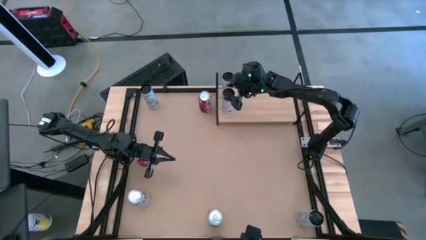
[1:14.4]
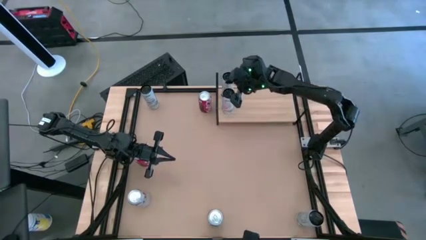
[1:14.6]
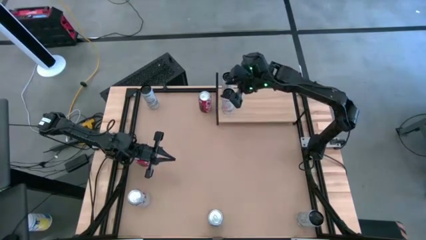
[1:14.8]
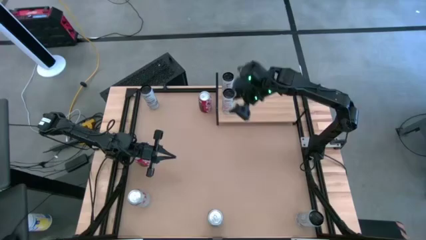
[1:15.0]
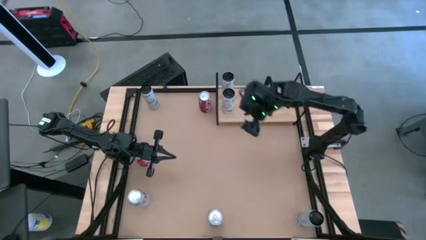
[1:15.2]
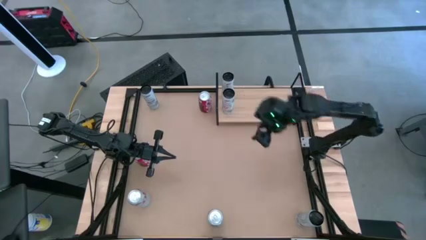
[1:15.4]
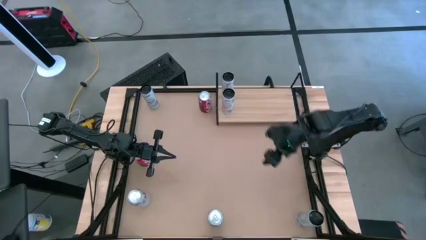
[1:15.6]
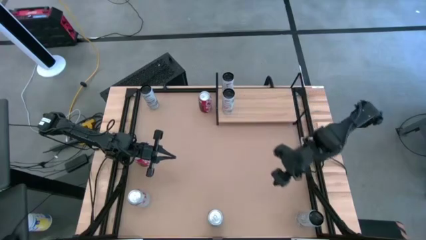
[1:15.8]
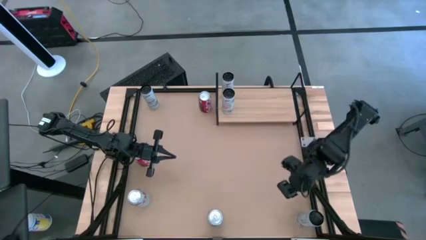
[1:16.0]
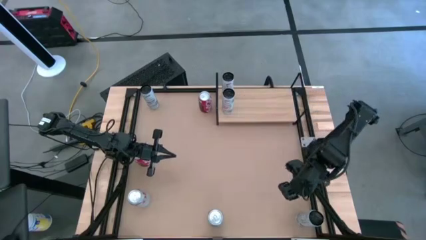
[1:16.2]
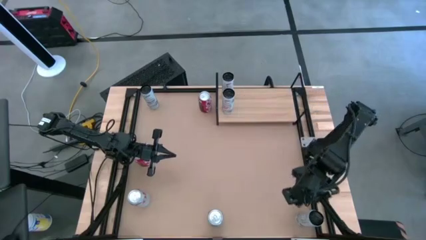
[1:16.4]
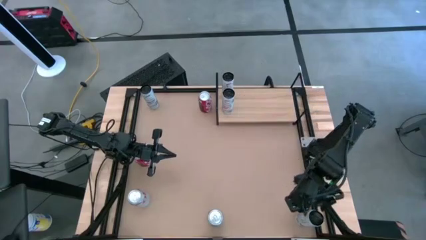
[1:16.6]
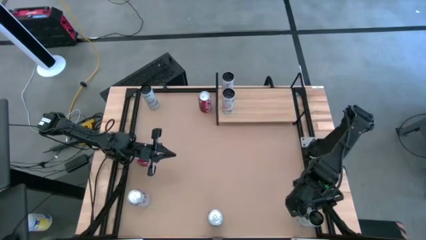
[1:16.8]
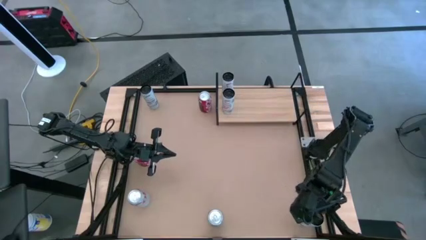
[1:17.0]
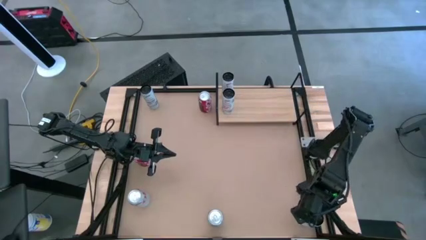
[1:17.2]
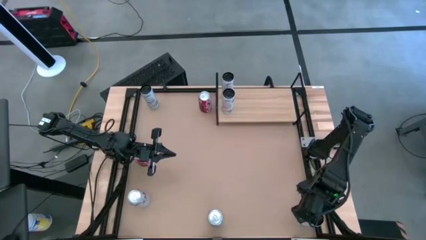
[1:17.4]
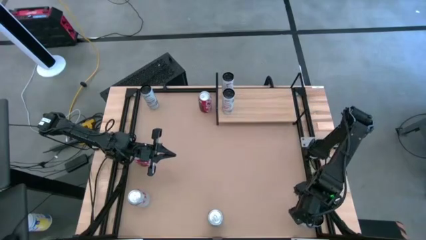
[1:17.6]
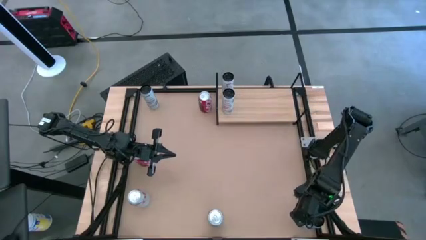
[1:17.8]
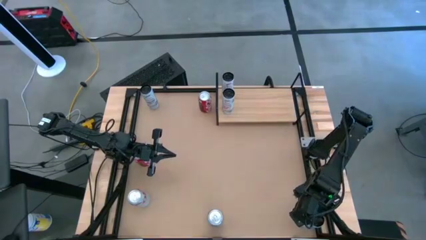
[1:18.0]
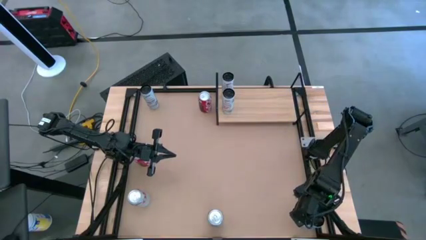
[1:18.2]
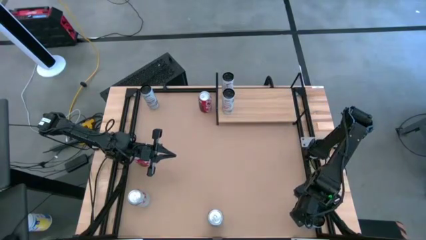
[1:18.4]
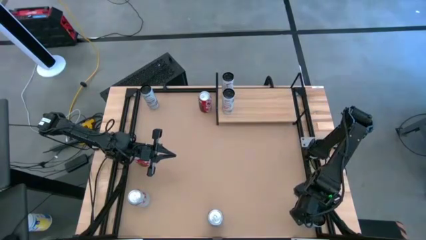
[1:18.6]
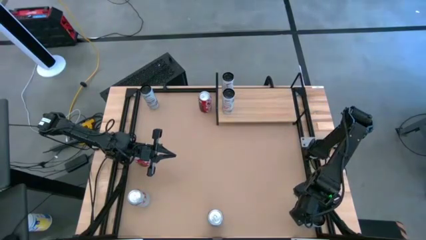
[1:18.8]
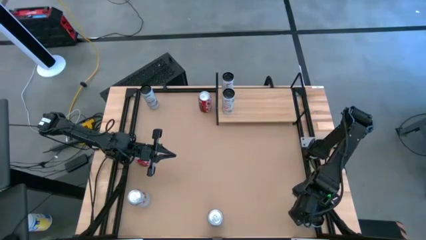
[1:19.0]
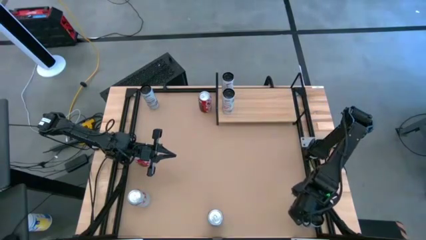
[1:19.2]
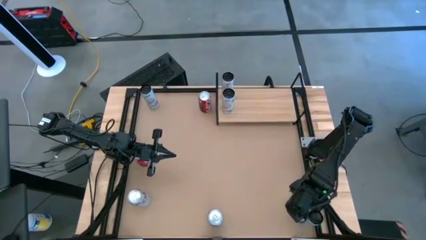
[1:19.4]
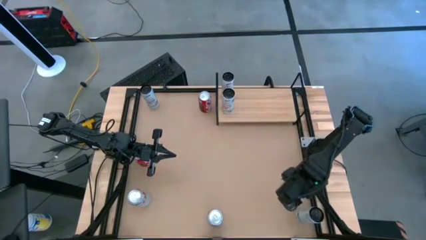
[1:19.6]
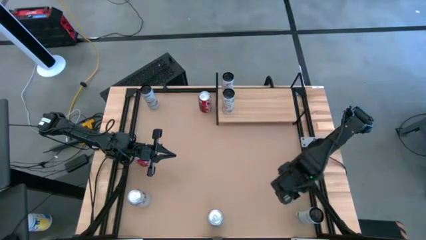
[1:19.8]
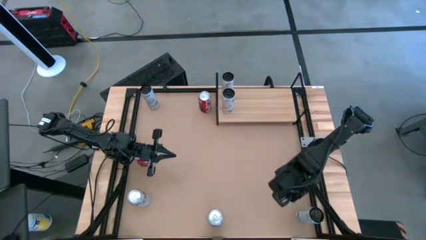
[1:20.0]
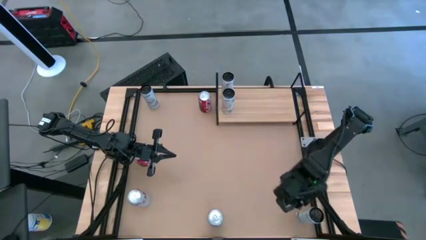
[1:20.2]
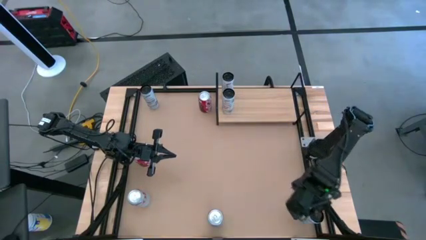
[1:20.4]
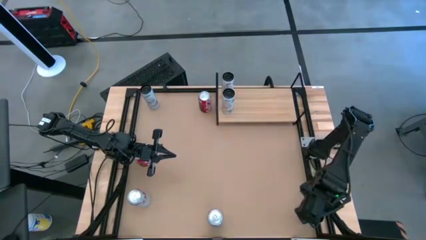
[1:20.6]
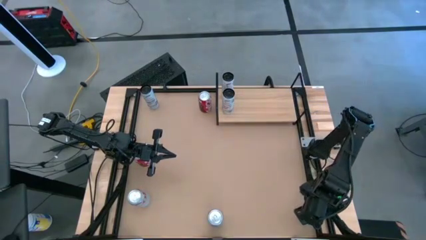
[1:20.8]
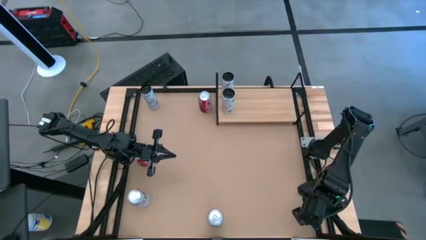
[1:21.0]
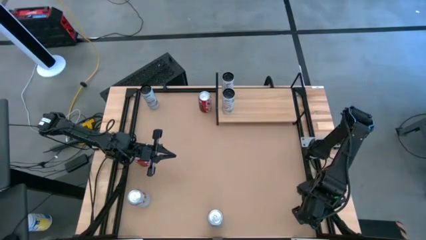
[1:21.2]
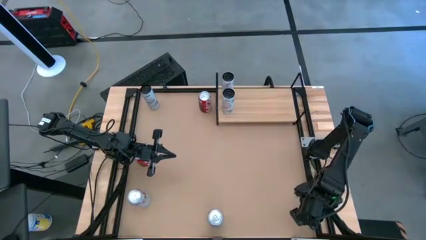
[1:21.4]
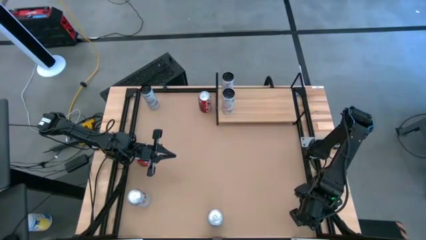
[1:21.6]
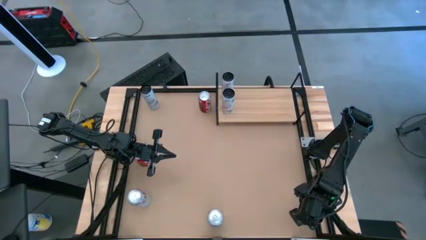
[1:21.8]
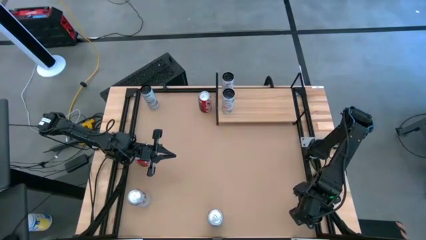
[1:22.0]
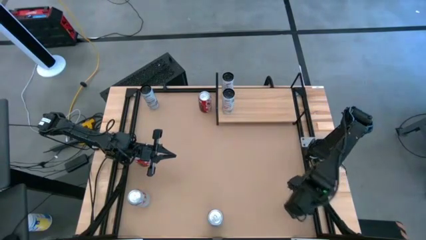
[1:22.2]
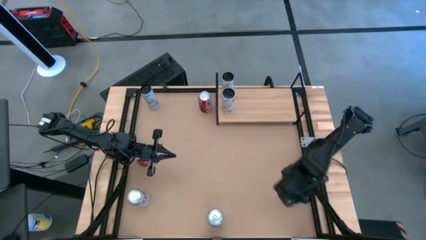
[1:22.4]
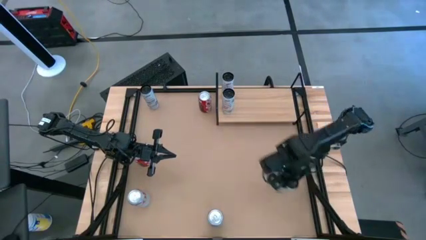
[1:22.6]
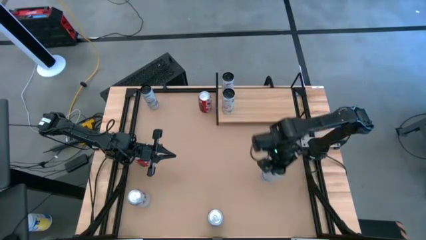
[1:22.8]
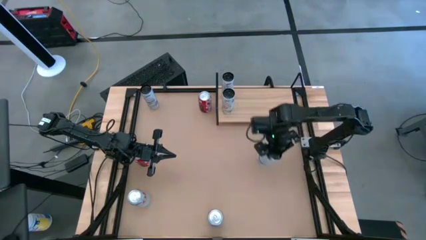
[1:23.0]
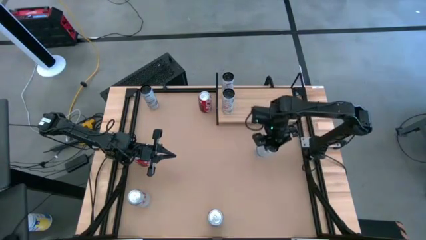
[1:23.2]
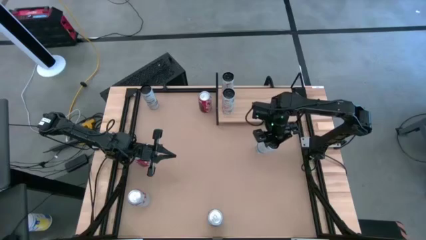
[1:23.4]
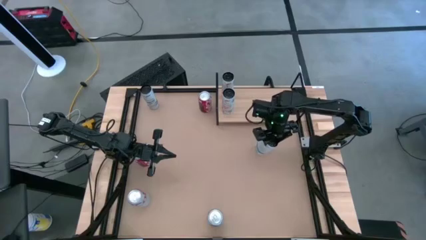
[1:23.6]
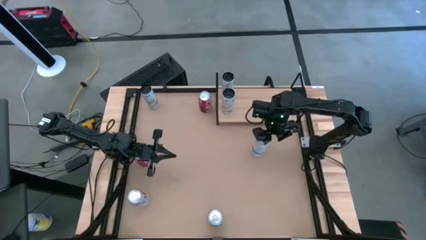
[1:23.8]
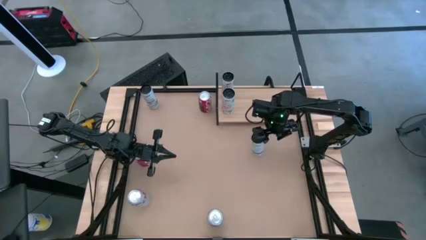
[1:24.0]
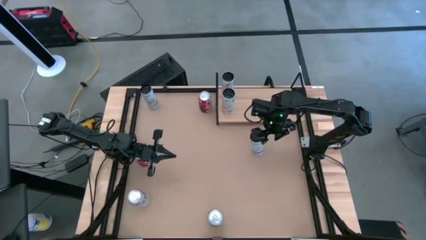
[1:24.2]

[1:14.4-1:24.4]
Task: Place canned beverage on shelf
Put the bottom white-blue soda can on the shelf

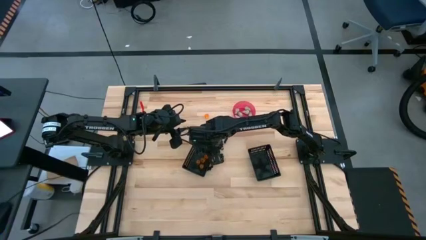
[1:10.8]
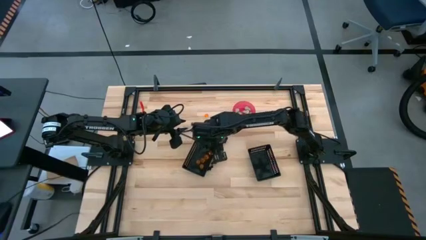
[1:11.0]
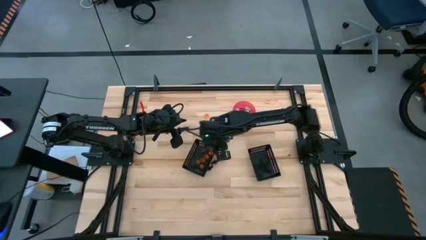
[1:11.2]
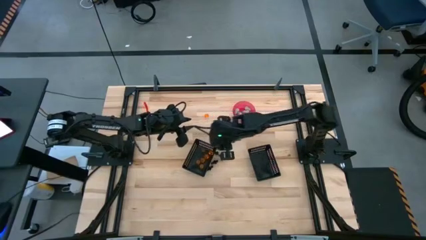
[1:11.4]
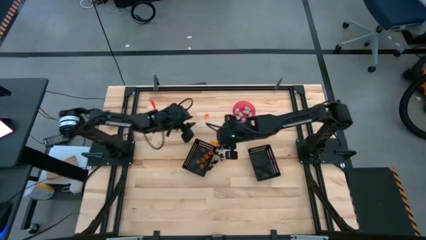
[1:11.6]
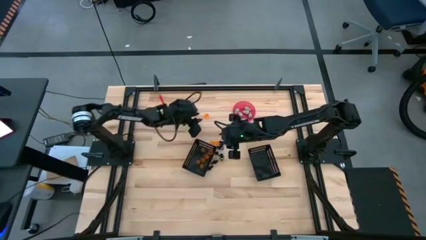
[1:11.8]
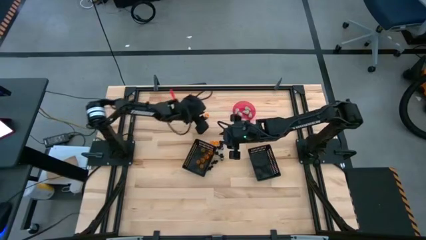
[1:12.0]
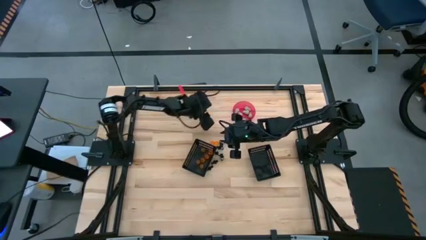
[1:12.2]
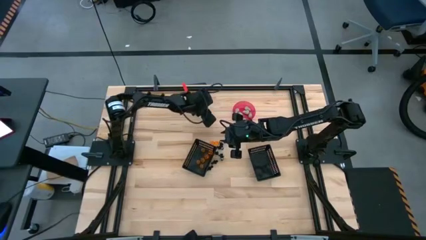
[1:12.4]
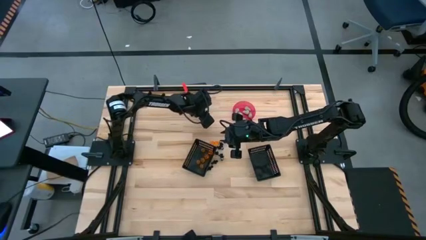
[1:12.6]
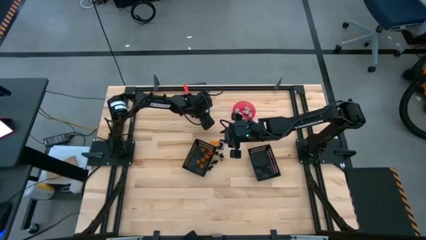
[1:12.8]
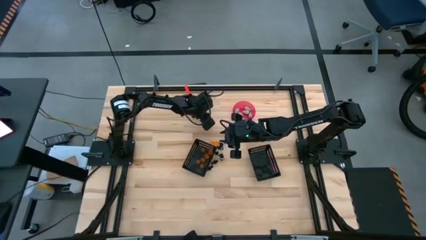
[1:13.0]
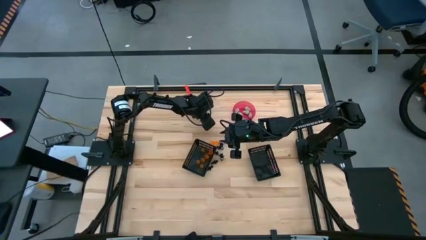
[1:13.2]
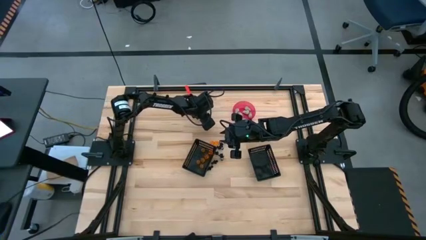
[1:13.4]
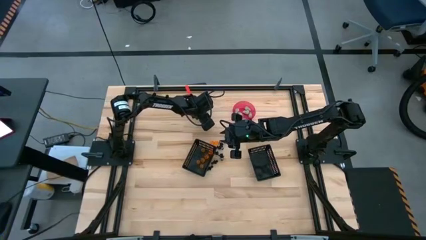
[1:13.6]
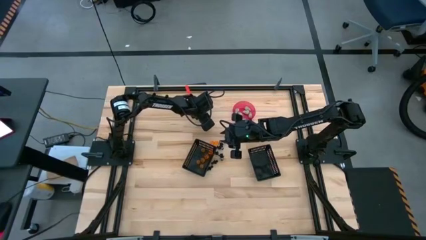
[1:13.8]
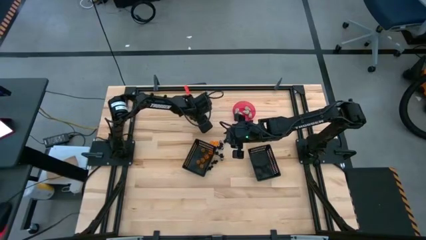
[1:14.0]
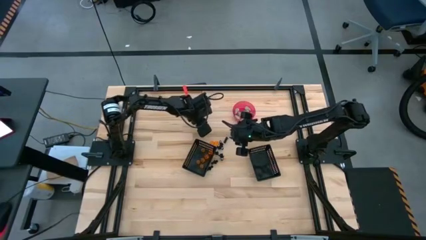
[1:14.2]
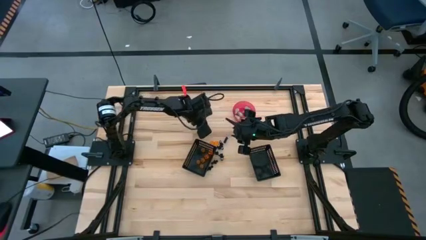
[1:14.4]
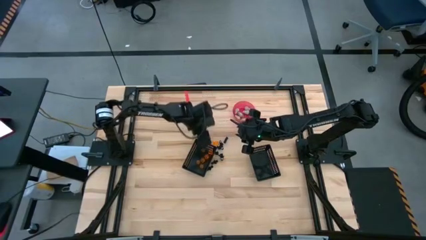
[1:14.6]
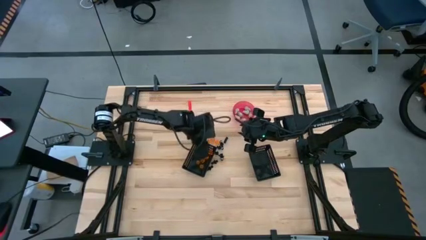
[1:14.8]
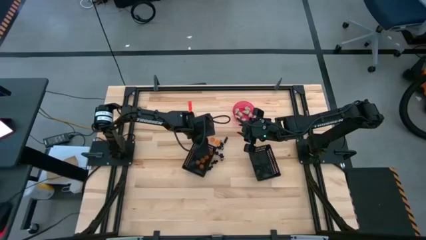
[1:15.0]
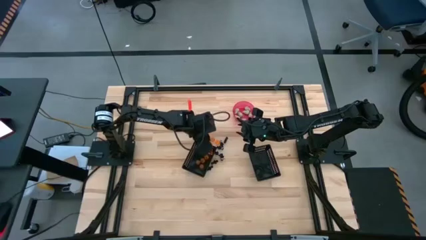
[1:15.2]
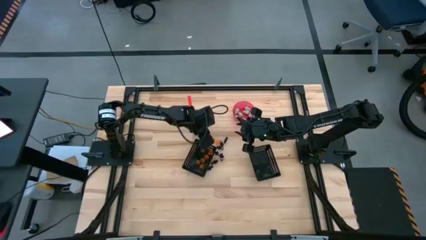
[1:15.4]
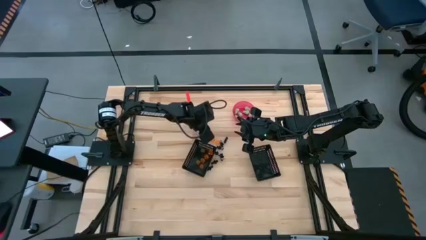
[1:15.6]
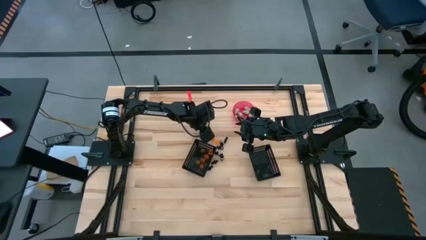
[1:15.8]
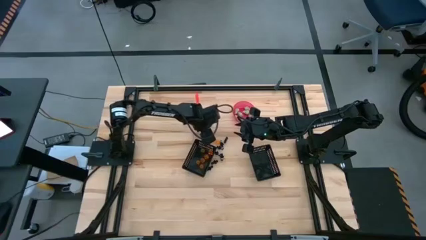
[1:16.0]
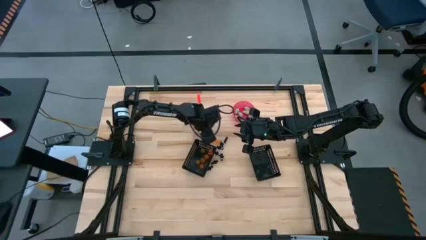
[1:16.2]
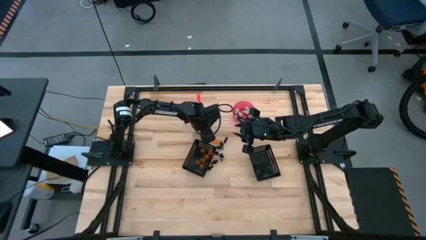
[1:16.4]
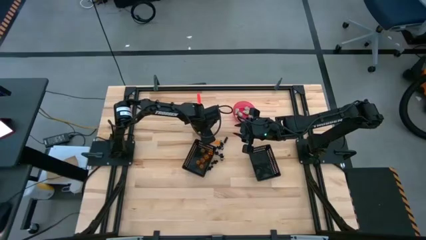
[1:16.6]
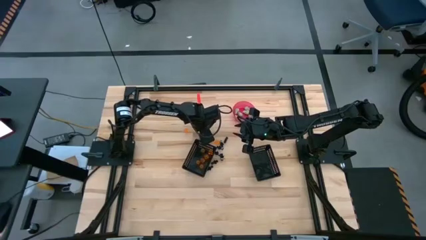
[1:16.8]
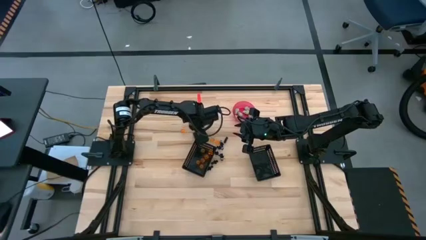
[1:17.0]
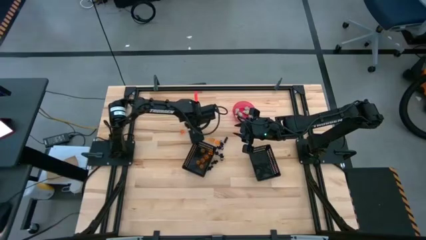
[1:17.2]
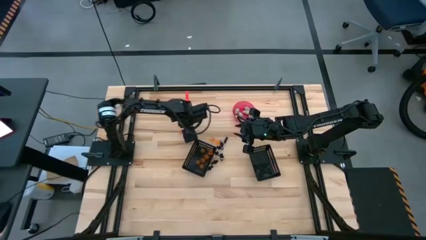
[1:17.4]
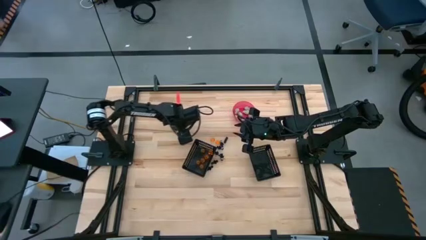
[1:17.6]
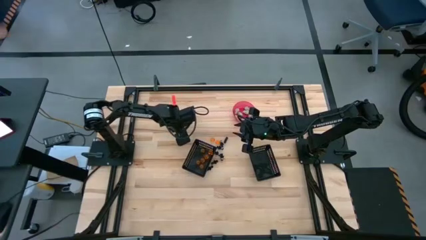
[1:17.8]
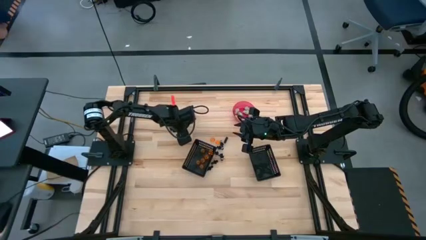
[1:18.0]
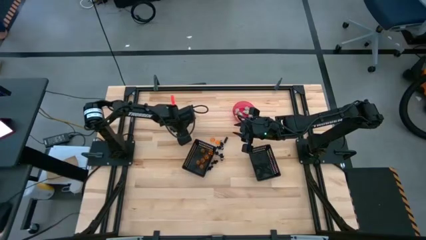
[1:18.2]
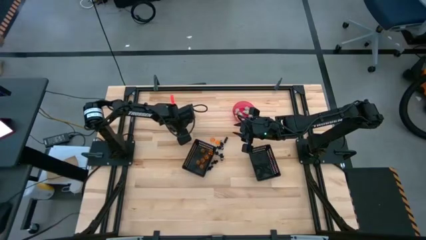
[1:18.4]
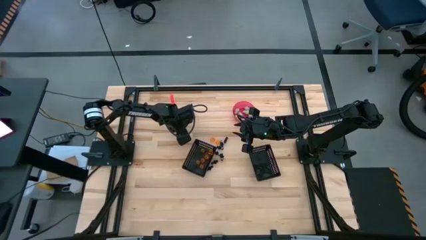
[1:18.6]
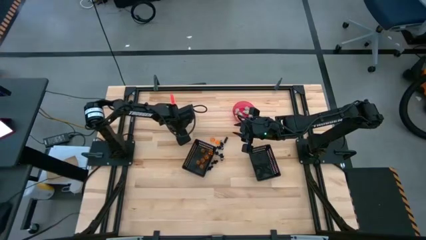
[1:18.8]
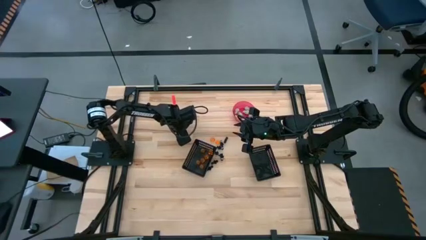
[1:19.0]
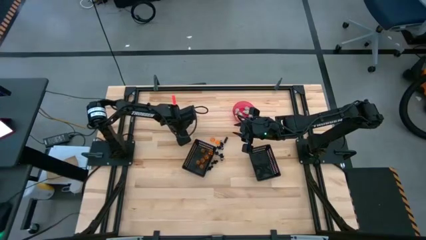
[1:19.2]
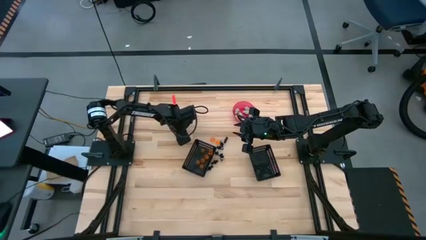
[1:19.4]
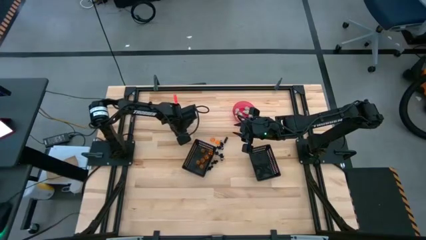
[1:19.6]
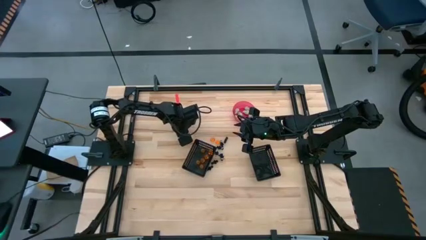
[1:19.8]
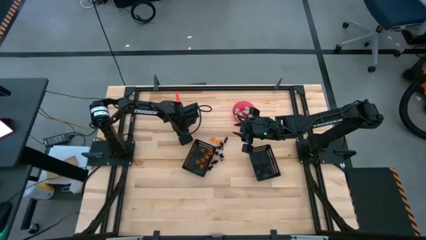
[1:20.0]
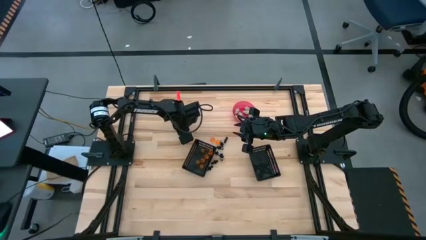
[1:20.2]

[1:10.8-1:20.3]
Task: Sort Halloween decoration
Put the orange pumpkin toy into the left black bin
